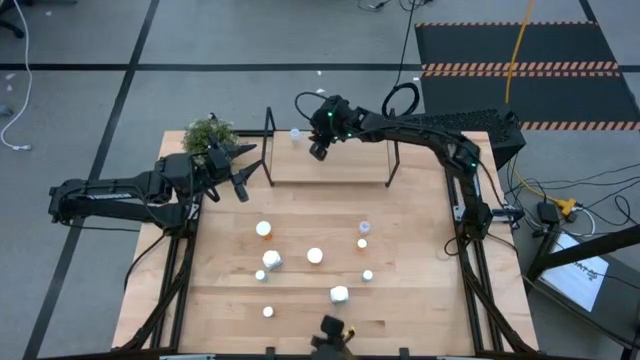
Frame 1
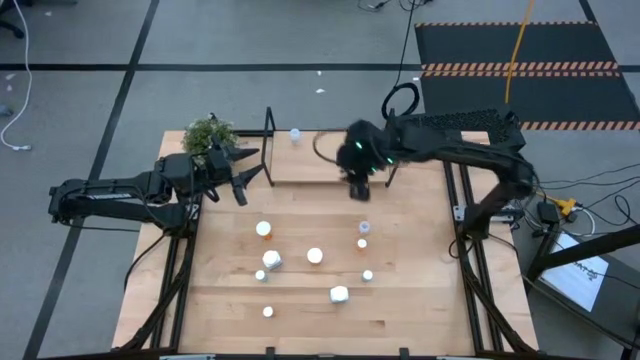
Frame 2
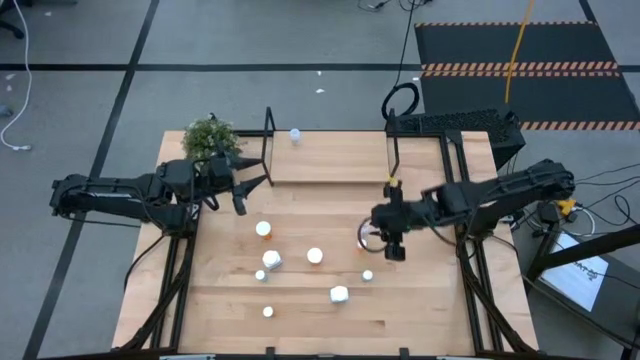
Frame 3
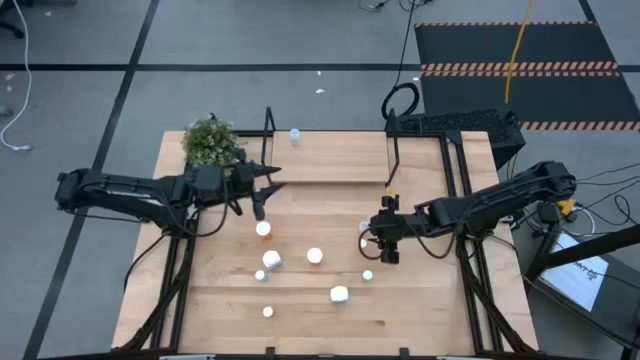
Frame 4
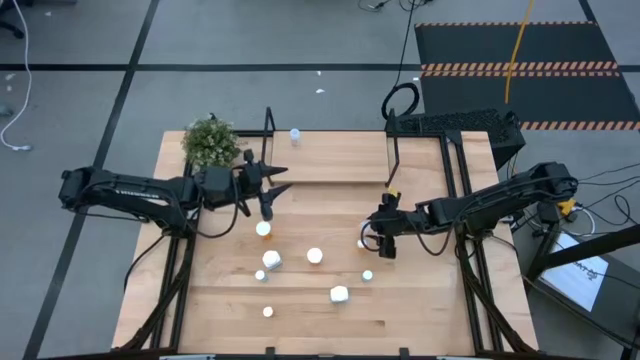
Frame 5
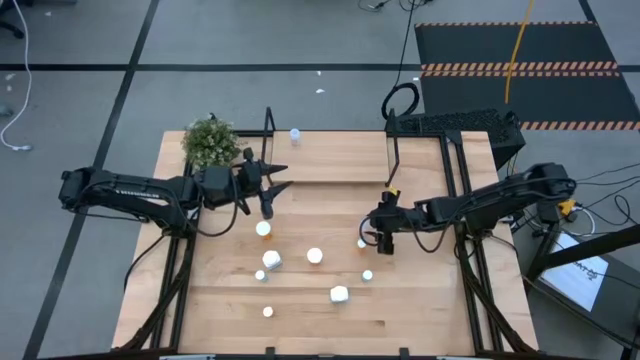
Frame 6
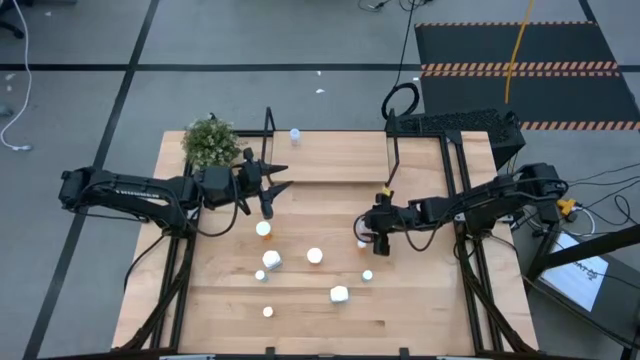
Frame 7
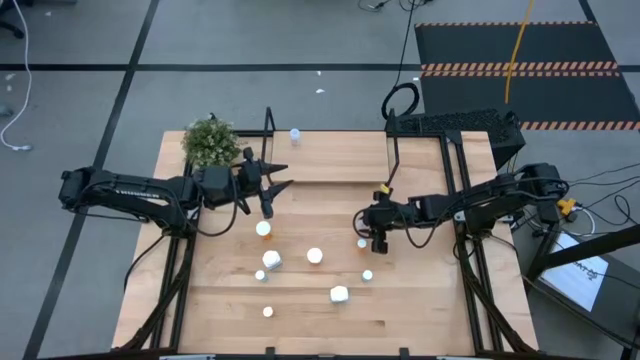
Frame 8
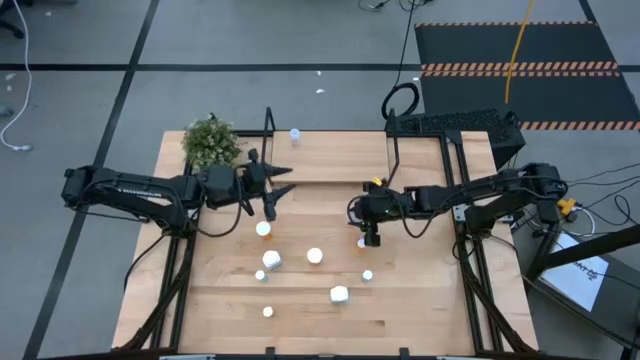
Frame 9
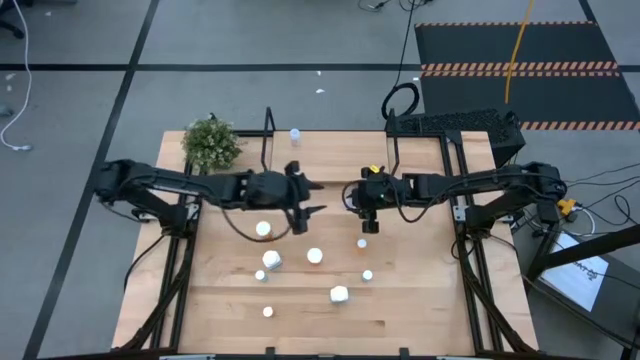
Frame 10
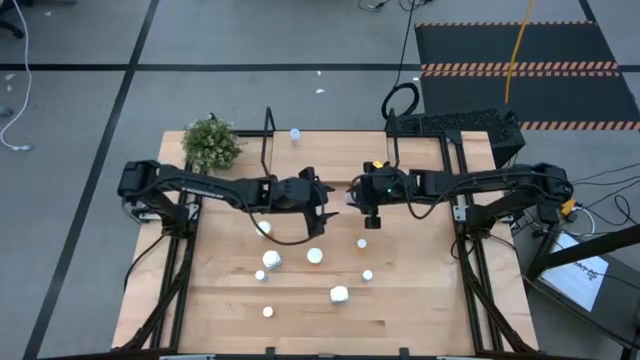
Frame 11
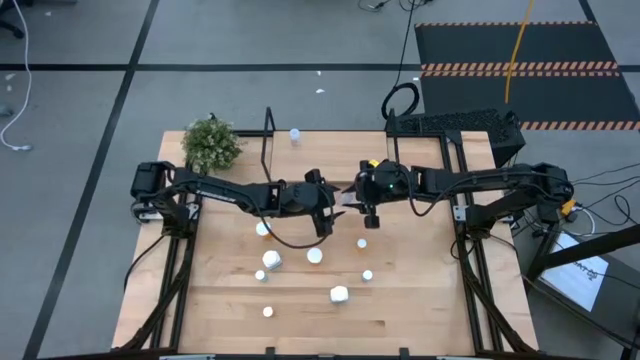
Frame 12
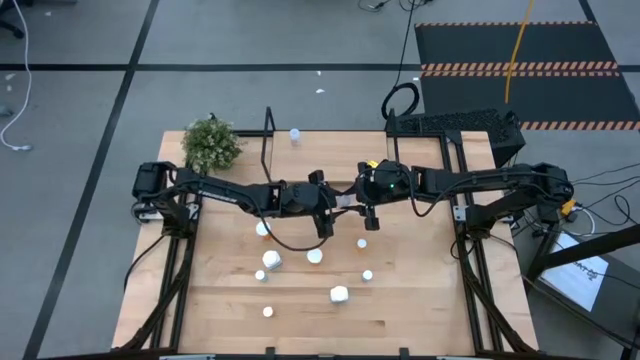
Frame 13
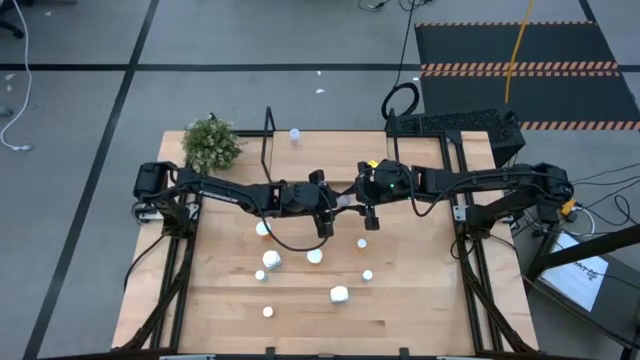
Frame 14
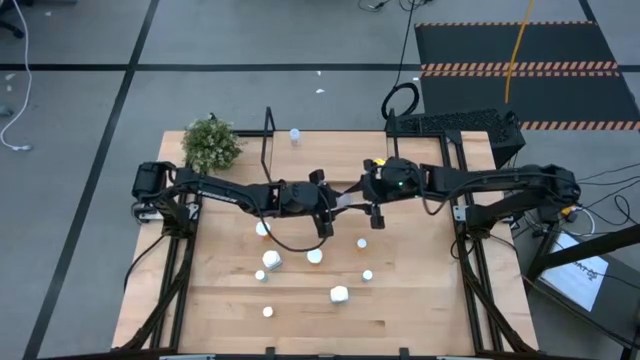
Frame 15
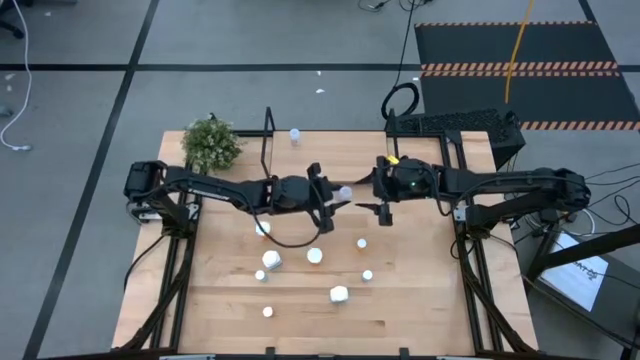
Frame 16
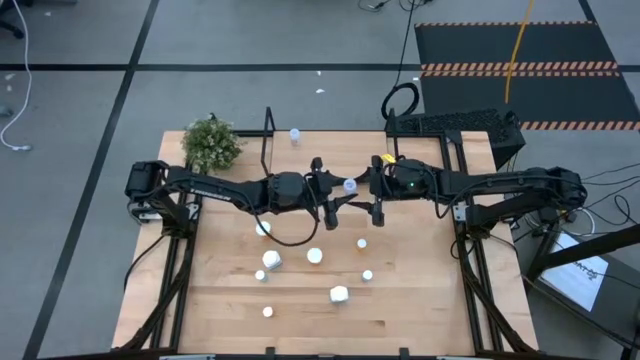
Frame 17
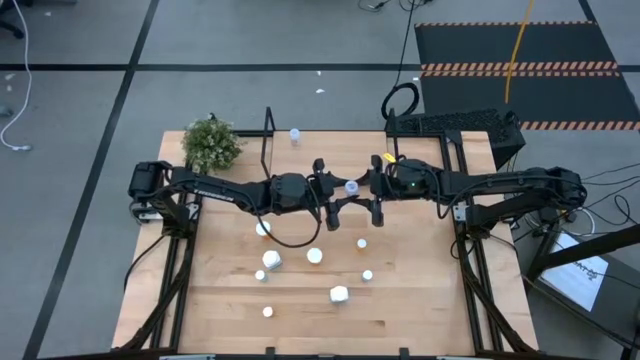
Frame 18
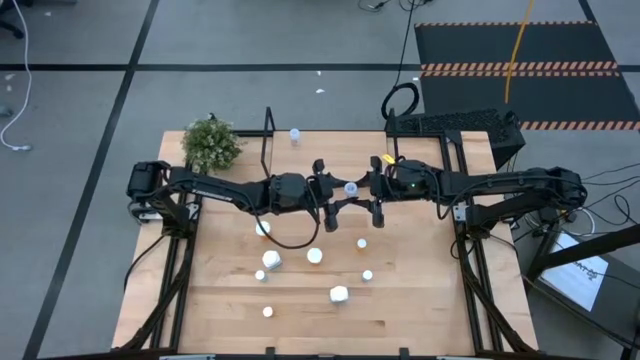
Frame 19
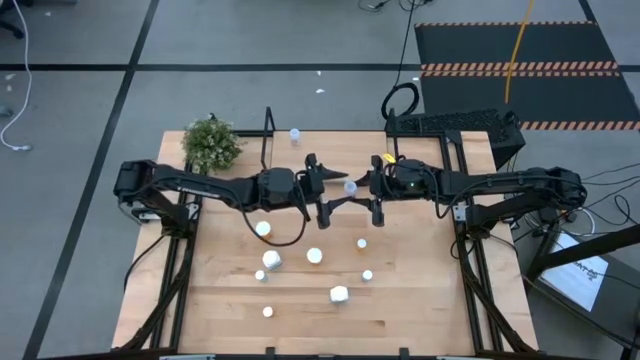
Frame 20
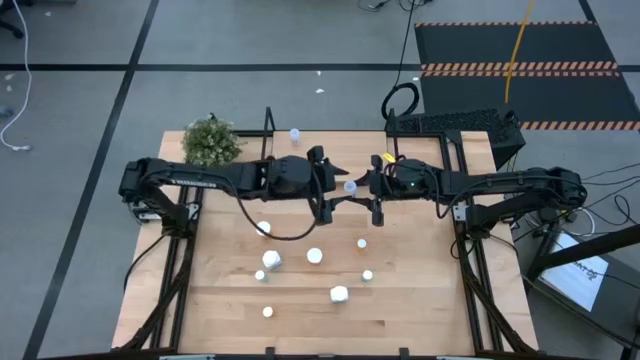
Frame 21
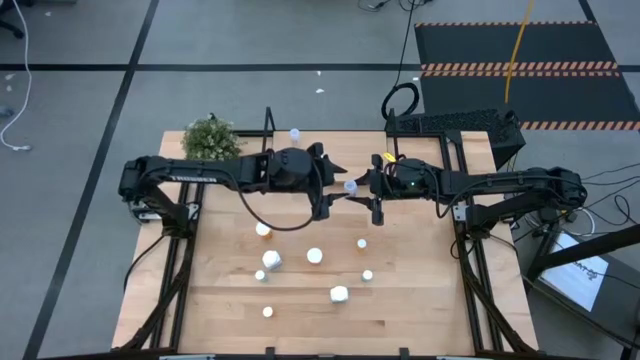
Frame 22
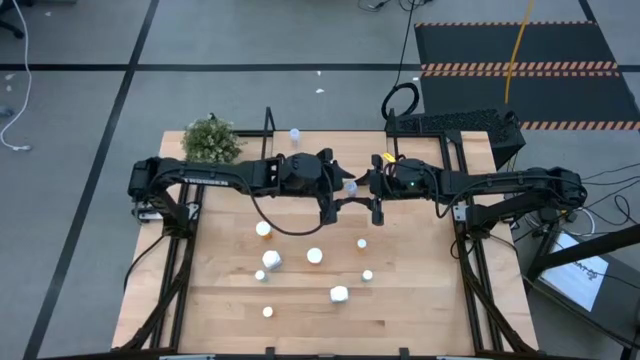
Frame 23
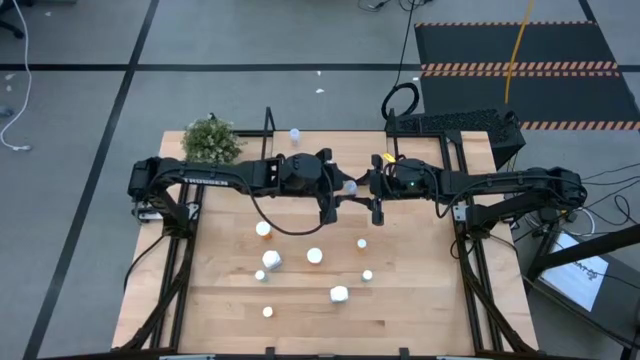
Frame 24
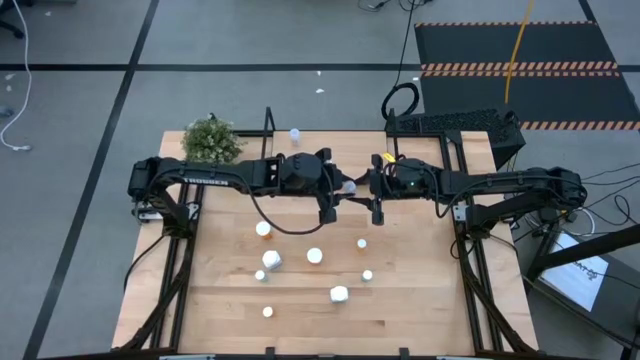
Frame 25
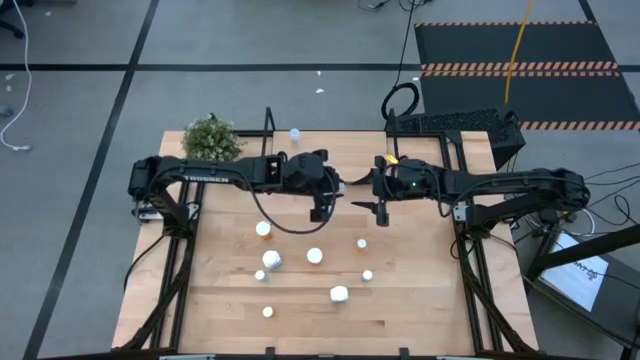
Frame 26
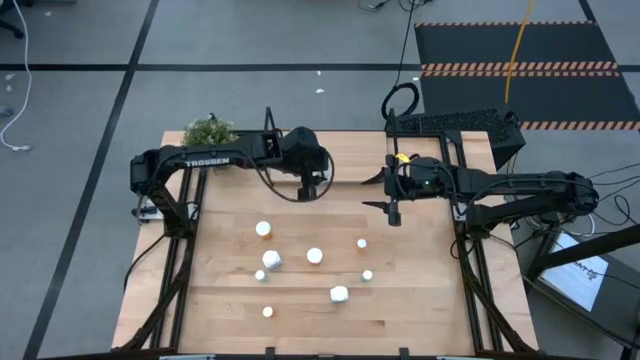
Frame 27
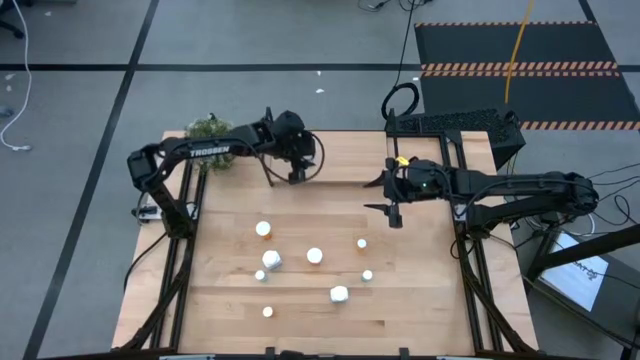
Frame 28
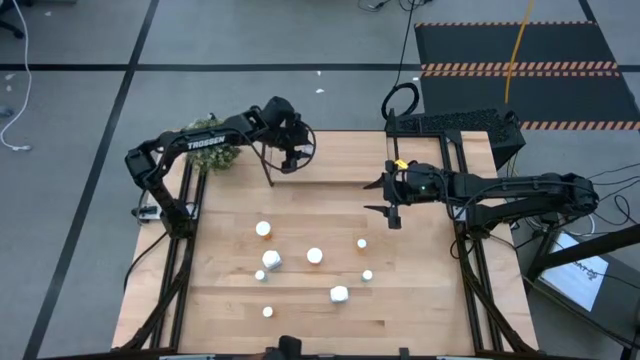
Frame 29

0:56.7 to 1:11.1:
Task: Pick and place medicine bottles onto shelf by color
Put the transparent pill bottle on the shelf aligned with the other transparent pill bottle

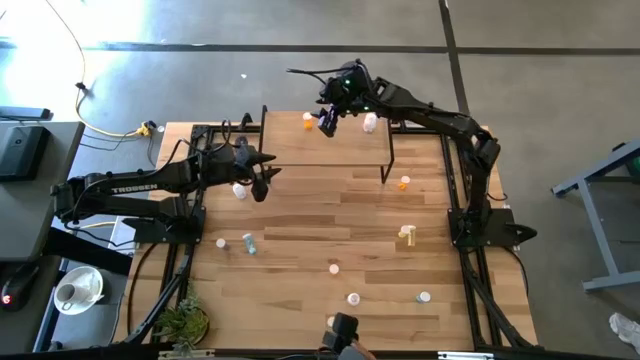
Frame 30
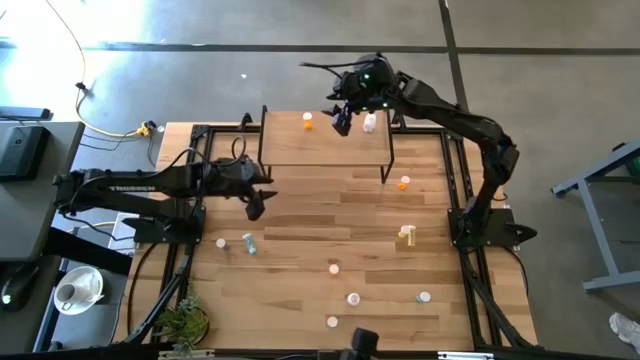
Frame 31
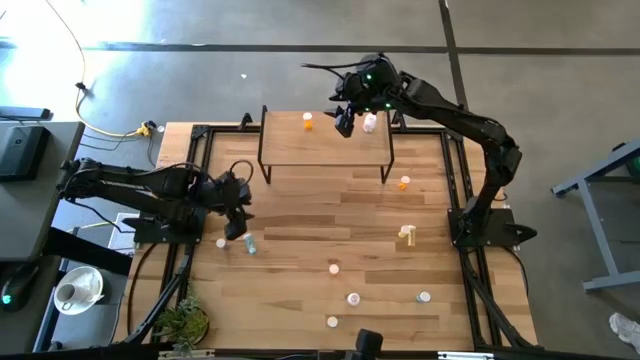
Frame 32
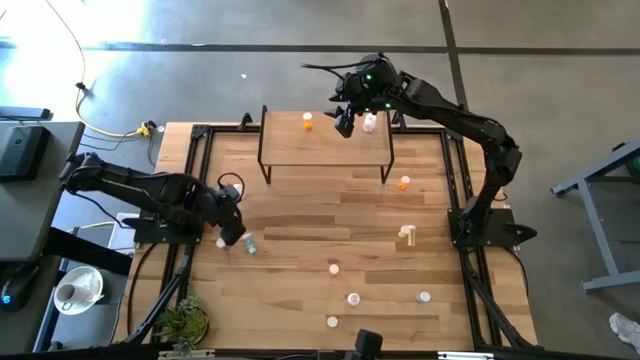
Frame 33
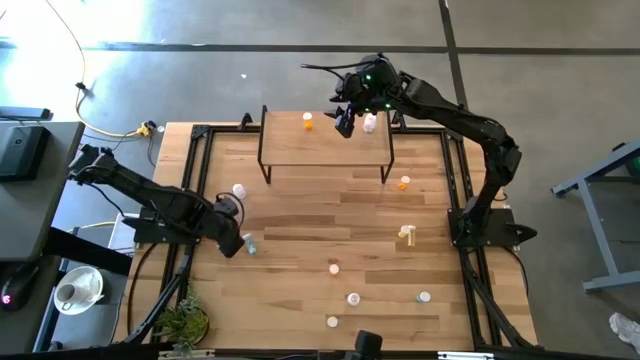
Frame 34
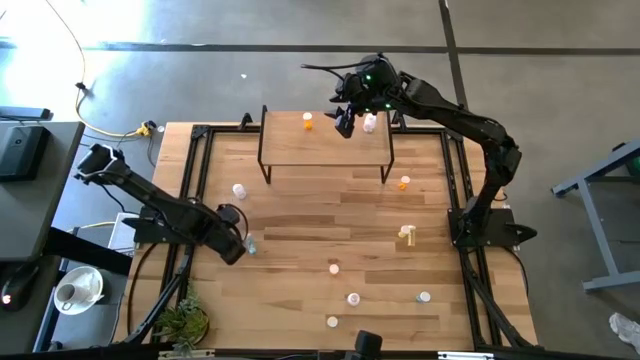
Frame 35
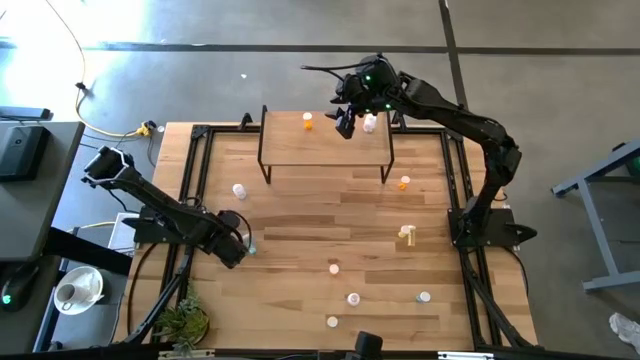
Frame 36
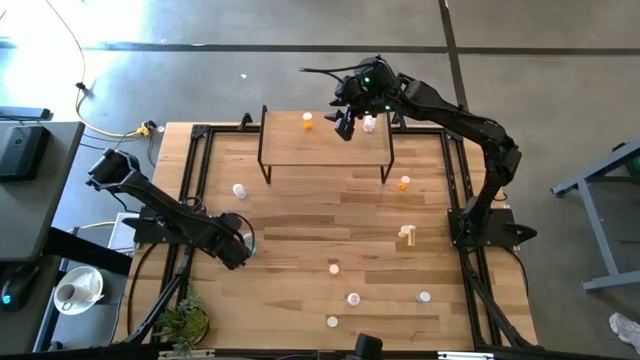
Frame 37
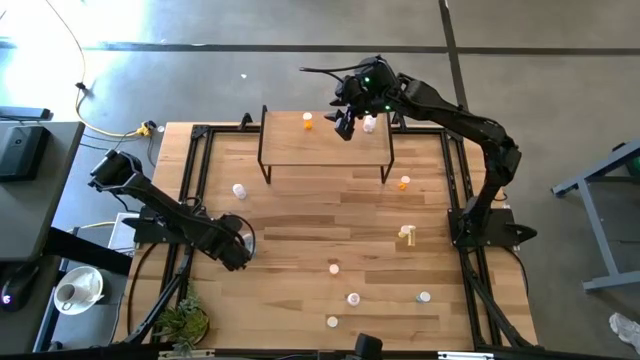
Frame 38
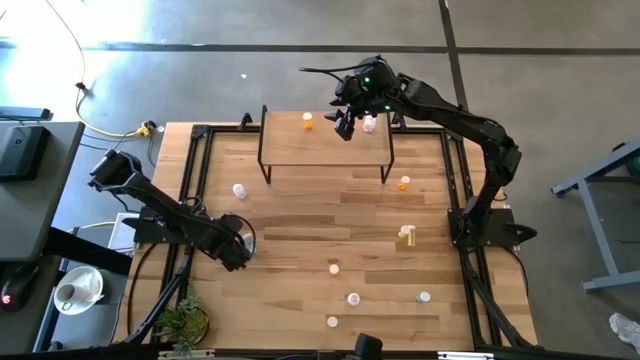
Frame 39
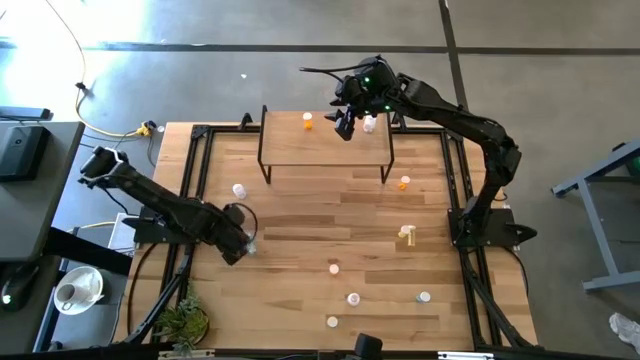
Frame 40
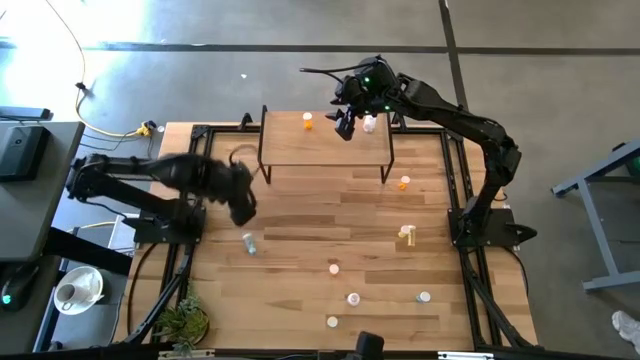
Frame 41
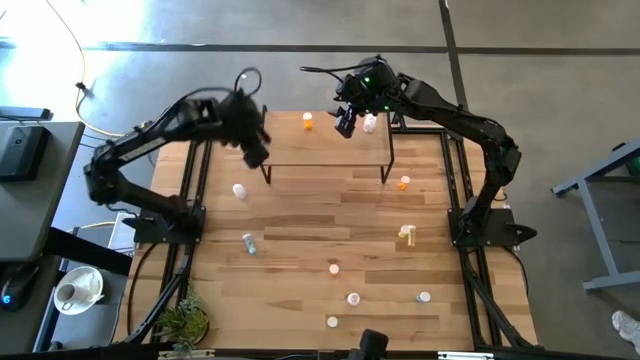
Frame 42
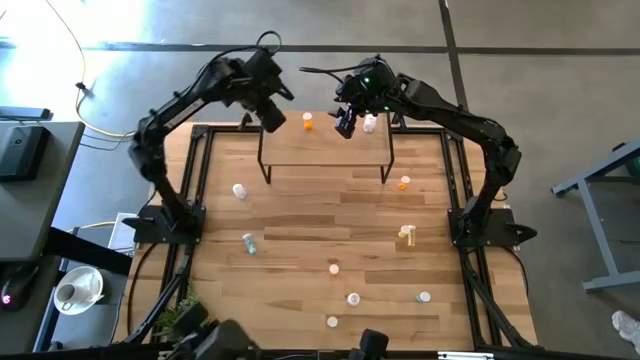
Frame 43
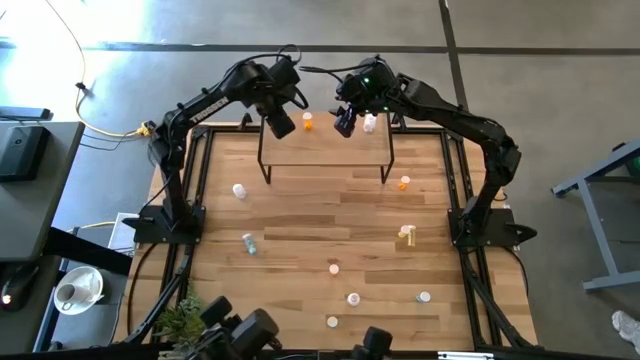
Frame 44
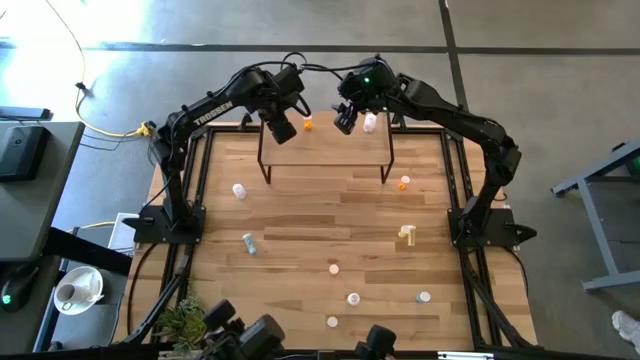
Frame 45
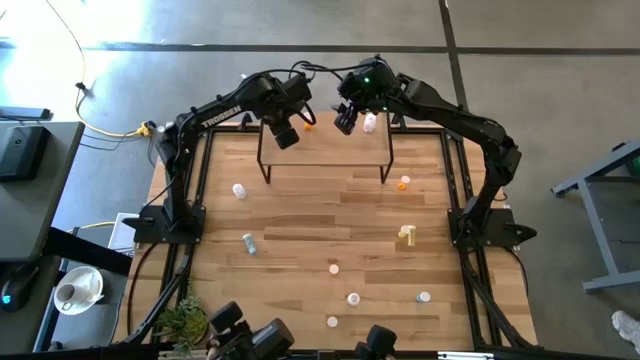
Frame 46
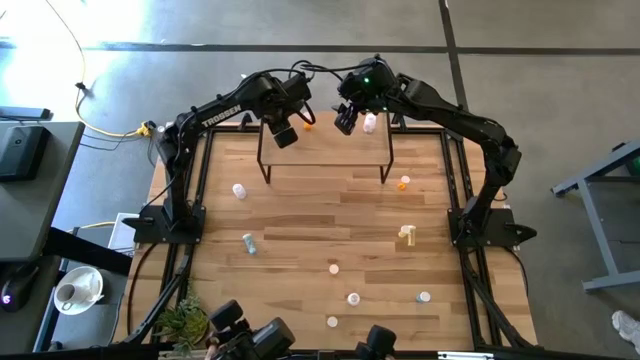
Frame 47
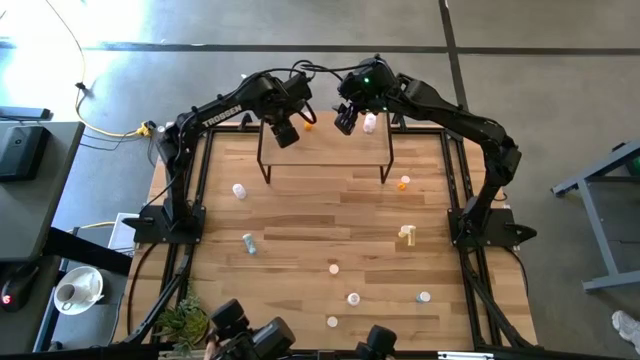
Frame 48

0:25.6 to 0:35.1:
Task: Pick and place medicine bottles onto shelf by color
Put the top left blue pill bottle on the shelf
